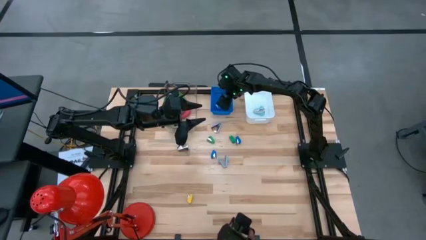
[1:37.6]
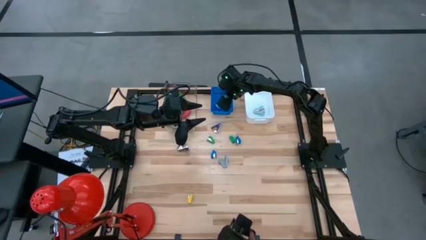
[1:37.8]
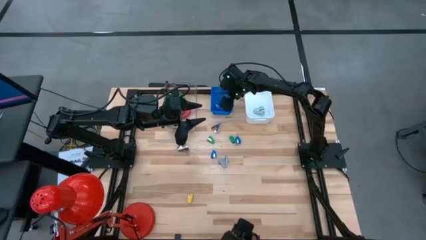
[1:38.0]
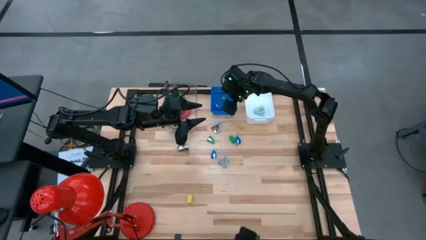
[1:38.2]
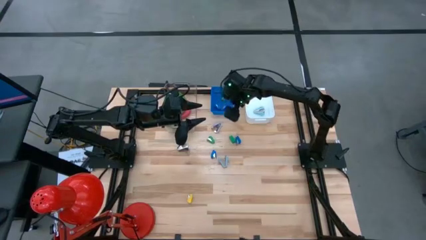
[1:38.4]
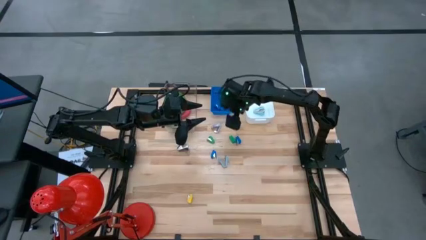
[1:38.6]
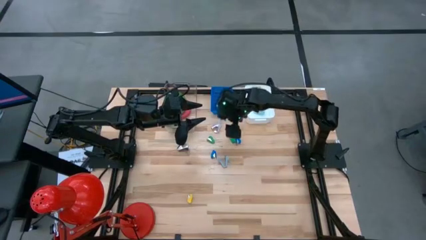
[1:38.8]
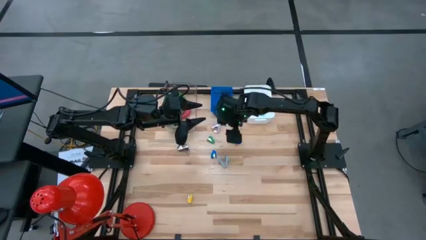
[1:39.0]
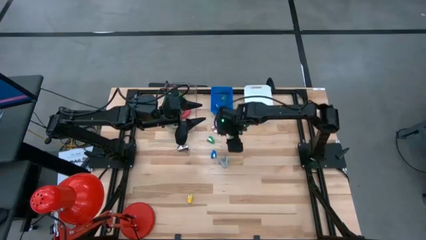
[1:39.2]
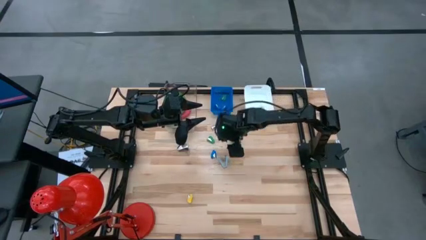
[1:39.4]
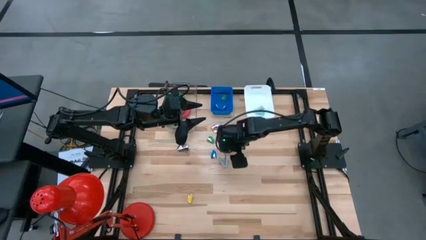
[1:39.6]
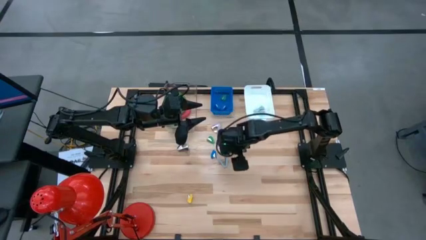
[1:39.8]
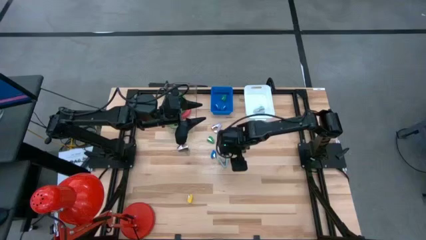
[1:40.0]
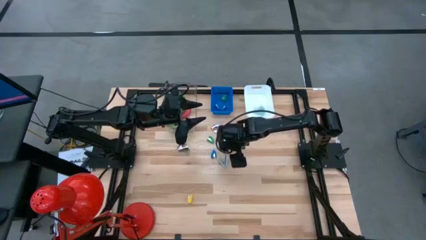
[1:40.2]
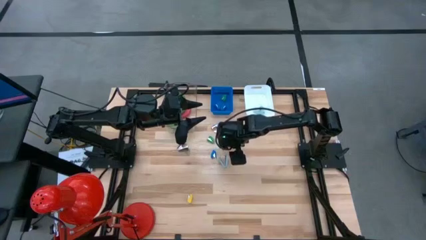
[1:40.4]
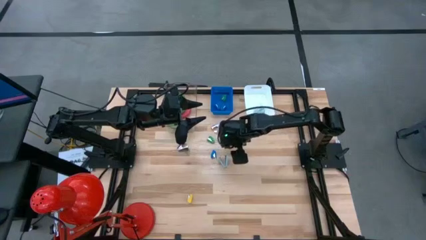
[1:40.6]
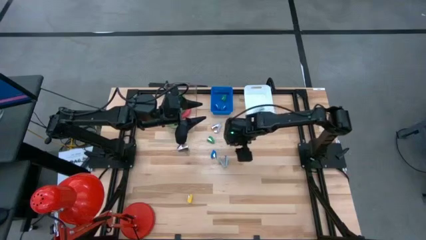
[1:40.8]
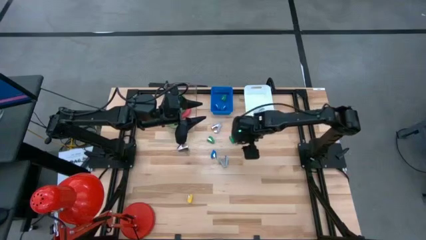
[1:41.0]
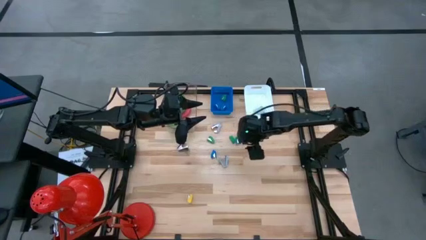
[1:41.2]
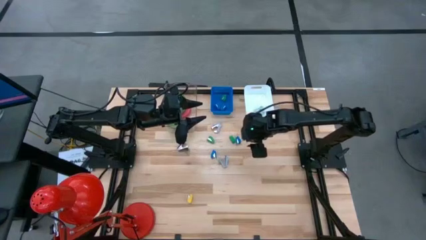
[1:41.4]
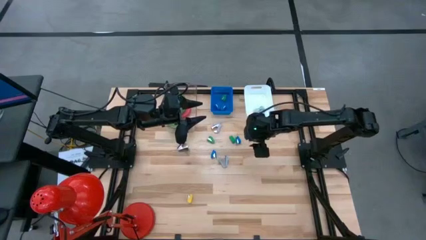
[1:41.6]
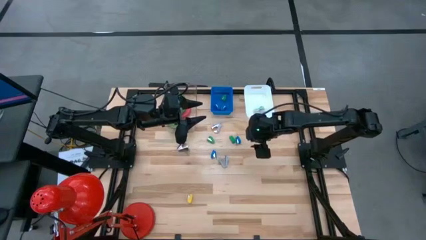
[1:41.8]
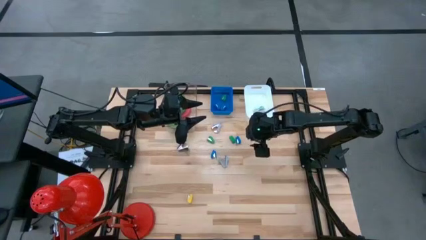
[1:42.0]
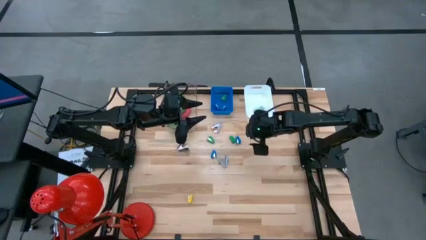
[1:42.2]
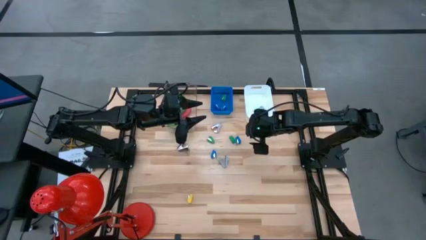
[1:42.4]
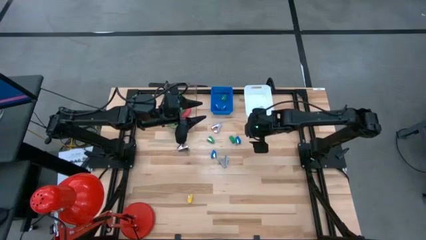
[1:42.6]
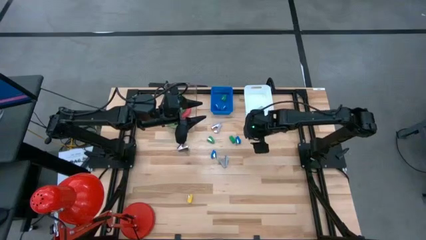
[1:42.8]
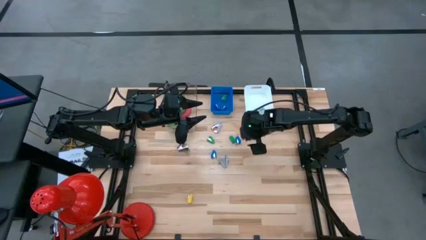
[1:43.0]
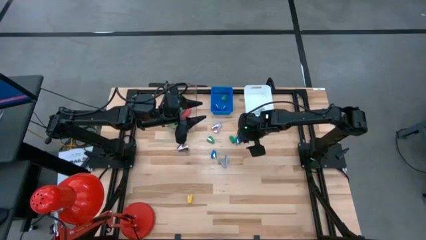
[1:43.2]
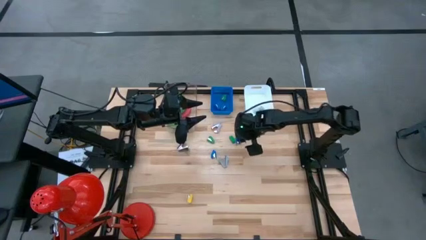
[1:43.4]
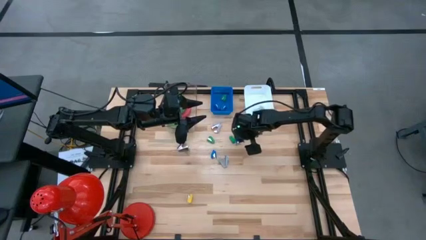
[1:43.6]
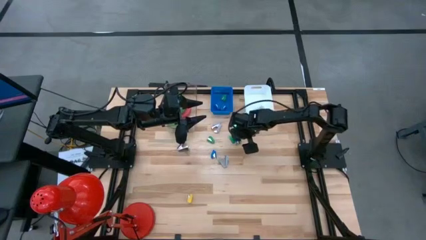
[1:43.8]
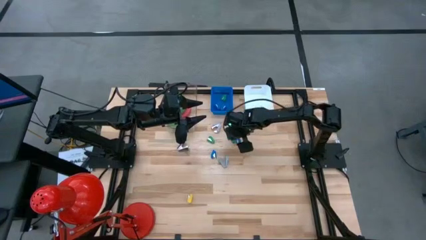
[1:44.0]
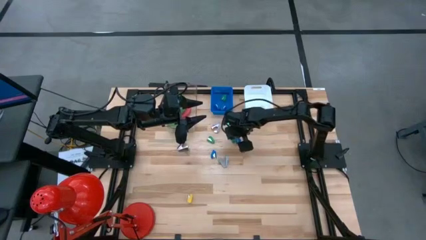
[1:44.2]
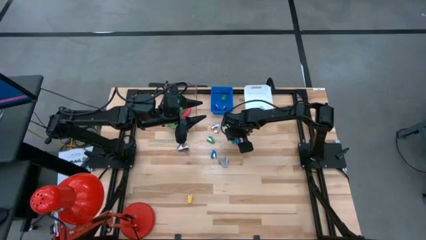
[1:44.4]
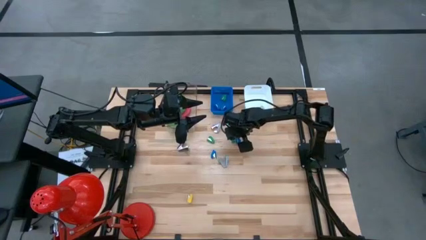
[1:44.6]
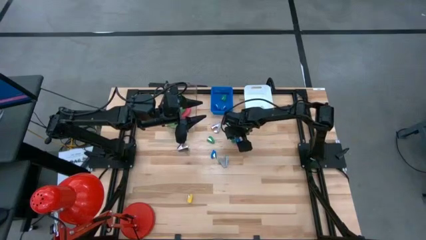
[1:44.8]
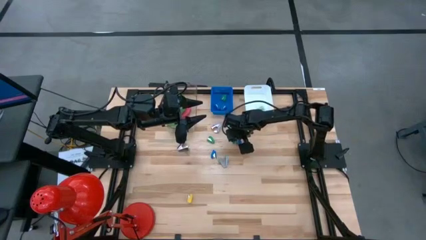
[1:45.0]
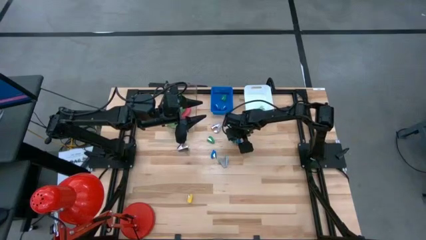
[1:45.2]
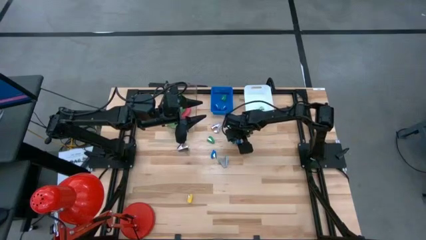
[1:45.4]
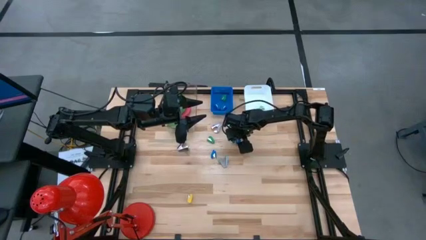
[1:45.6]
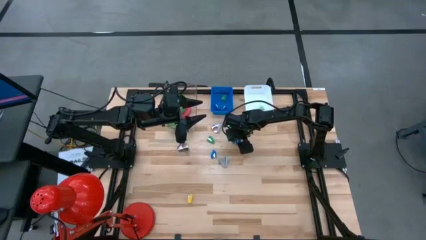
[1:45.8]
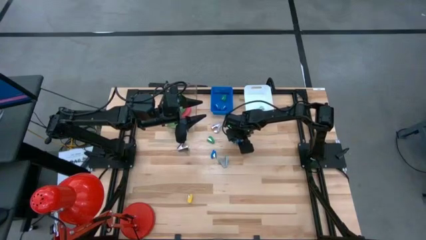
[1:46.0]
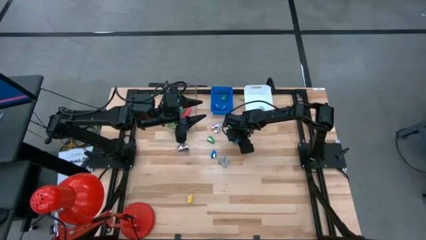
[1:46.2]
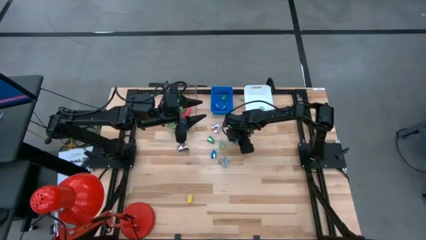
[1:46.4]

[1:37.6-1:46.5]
Task: Pick and place Stapler, Stapler remover, tape
Put the blue stapler into the blue bin

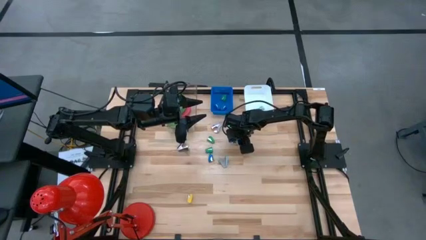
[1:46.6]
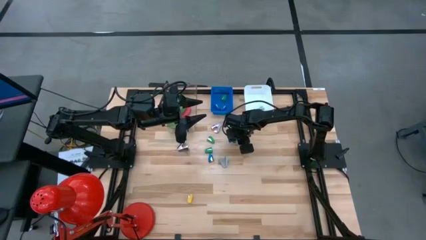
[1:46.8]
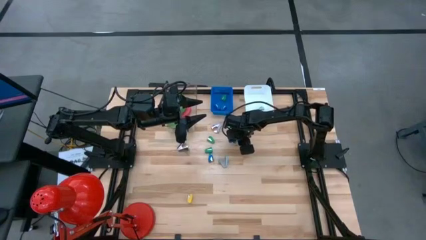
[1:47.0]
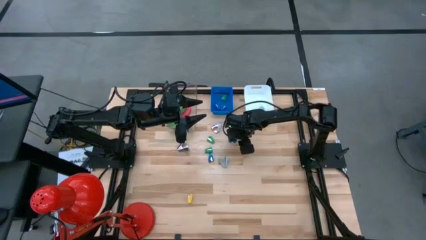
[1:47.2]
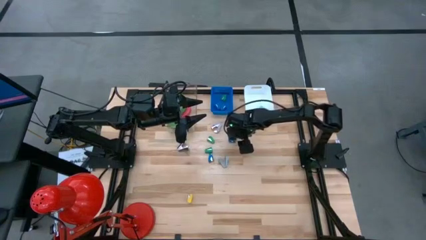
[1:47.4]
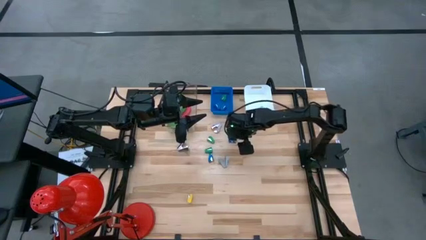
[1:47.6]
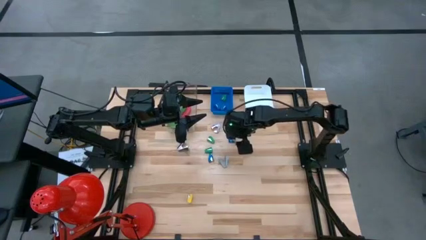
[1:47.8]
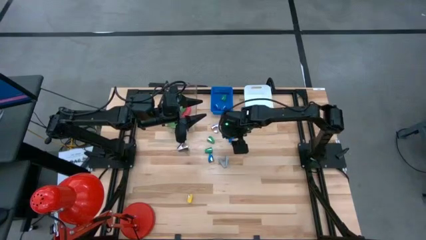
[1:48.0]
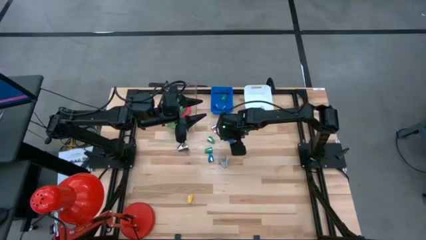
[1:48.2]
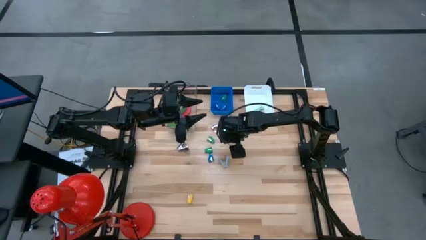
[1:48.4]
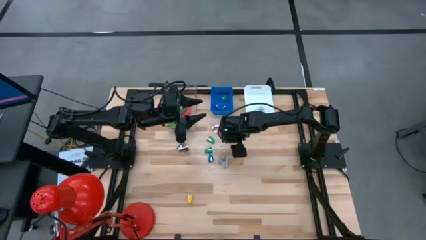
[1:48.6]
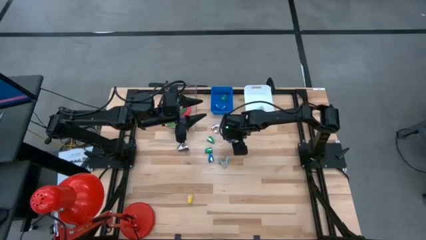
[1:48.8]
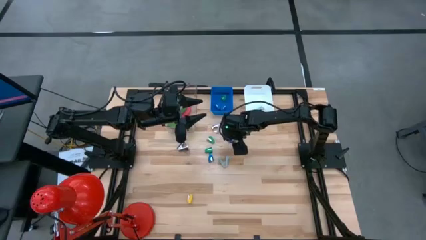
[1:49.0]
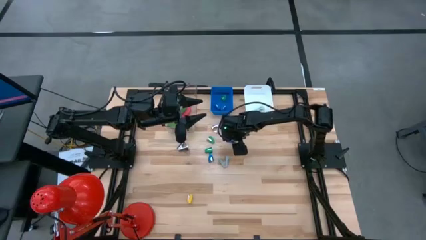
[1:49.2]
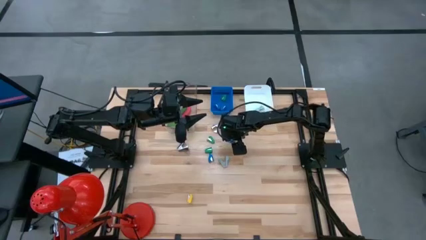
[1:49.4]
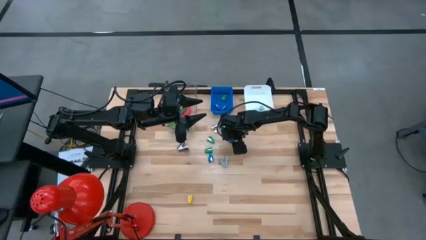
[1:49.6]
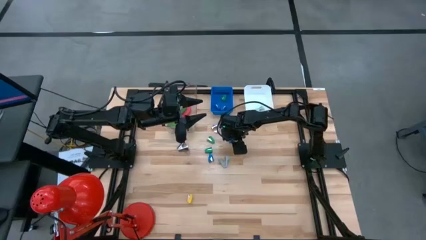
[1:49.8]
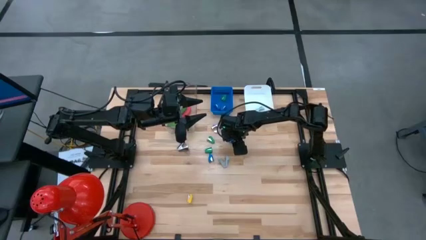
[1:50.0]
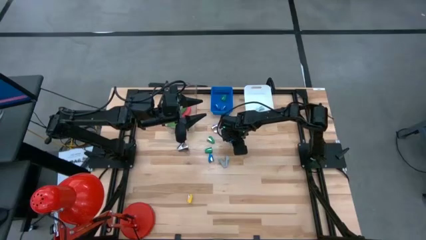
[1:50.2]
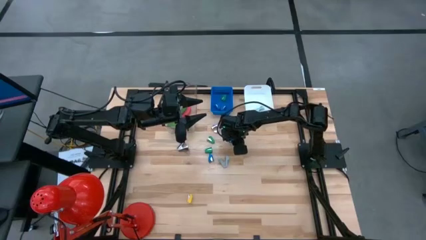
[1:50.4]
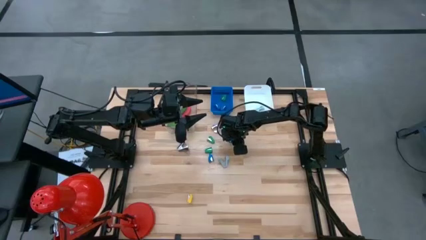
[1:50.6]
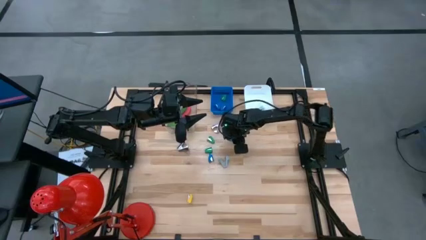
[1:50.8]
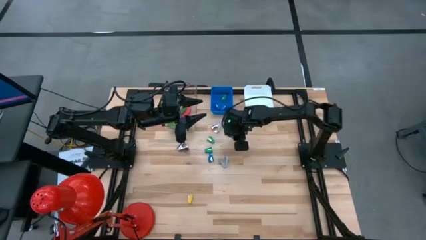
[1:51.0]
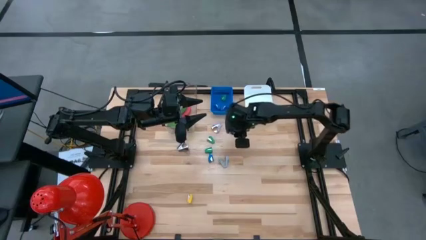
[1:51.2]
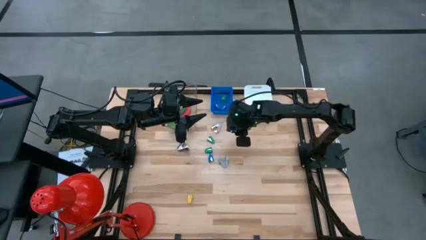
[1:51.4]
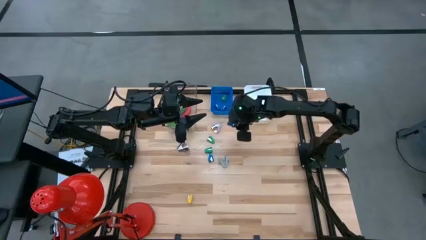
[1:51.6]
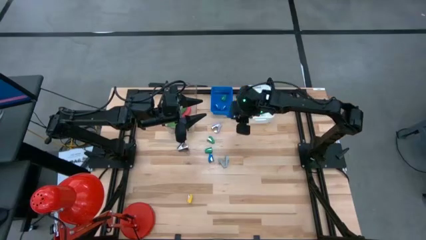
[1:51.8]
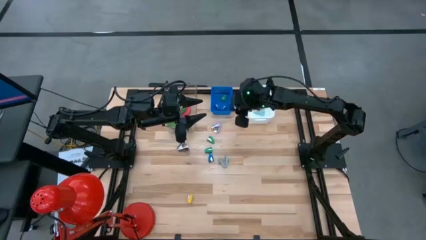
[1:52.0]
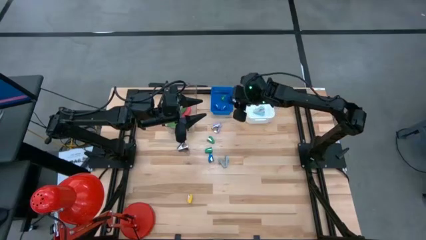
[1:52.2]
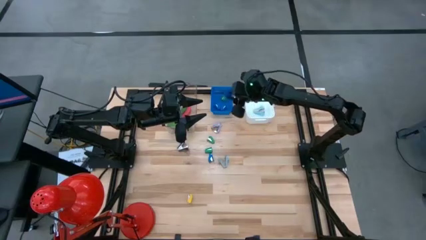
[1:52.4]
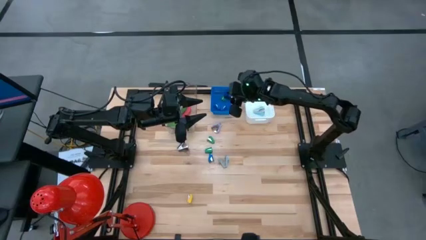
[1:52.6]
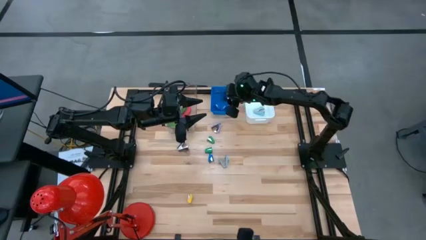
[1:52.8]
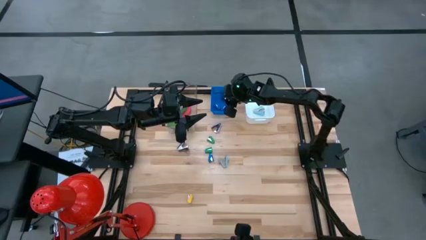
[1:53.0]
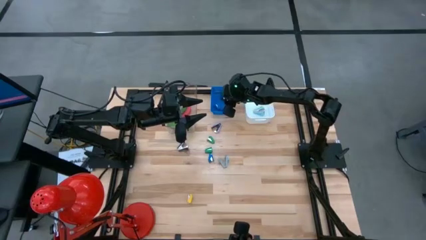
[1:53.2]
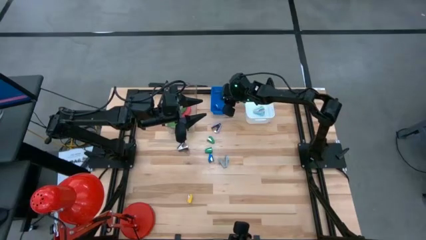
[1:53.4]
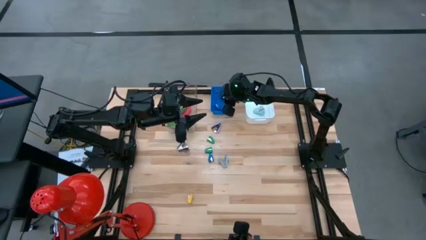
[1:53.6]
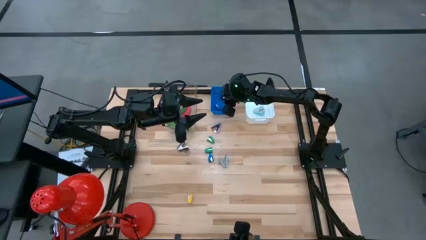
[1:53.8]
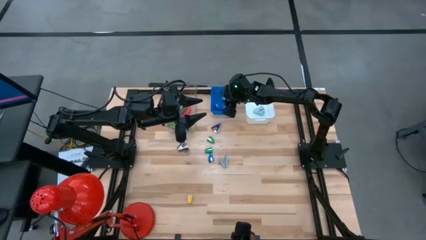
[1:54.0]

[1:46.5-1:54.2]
Put the blue stapler into the blue bin
